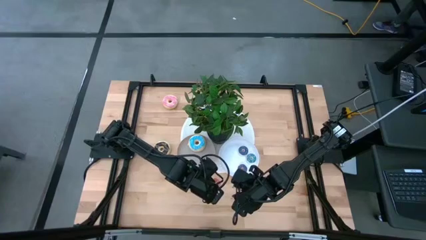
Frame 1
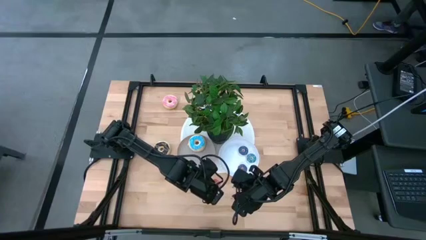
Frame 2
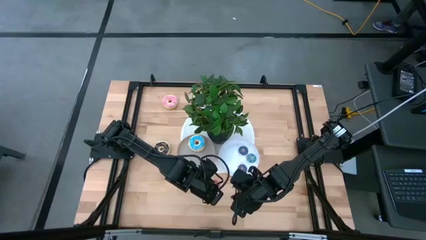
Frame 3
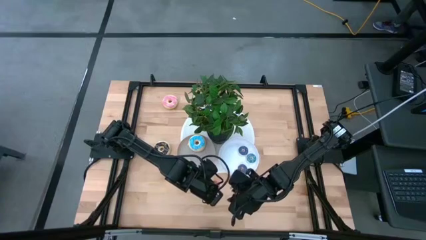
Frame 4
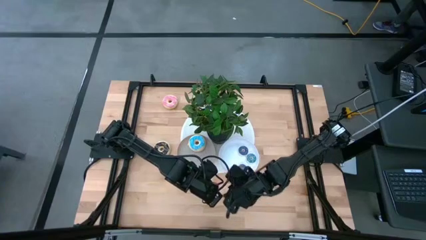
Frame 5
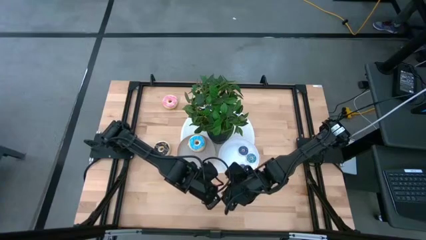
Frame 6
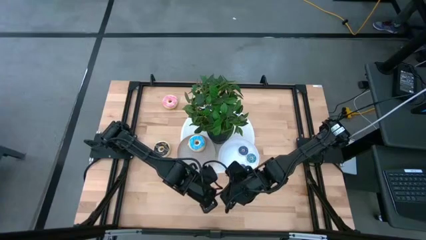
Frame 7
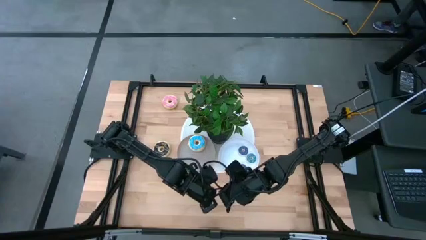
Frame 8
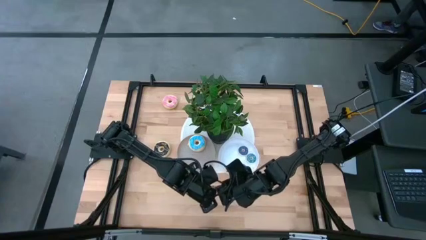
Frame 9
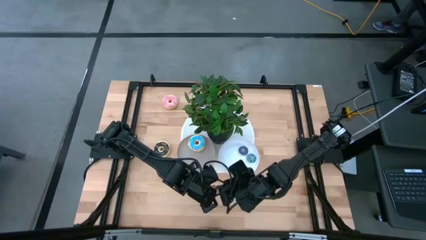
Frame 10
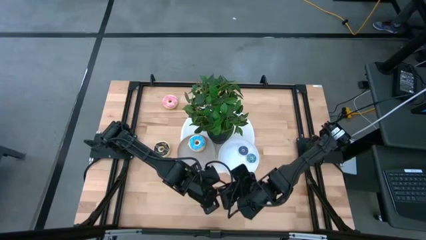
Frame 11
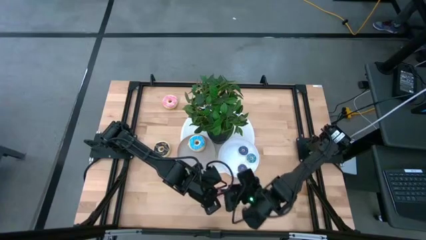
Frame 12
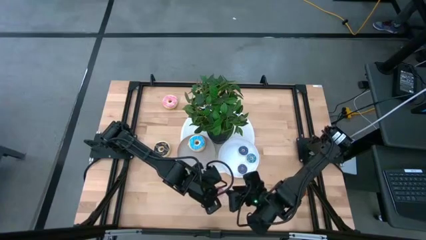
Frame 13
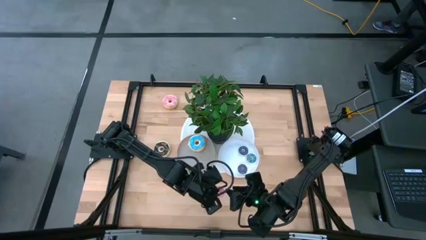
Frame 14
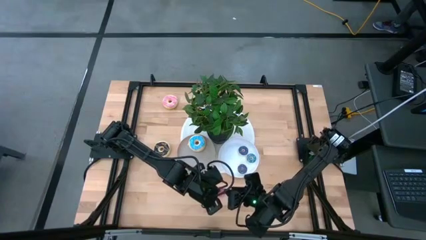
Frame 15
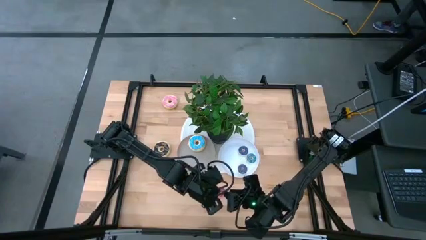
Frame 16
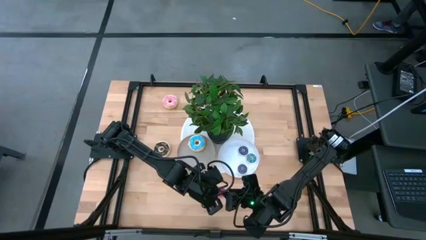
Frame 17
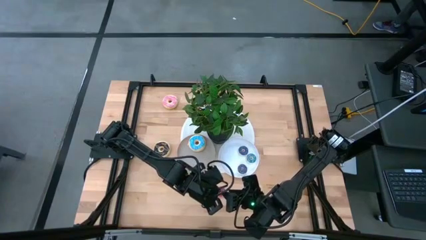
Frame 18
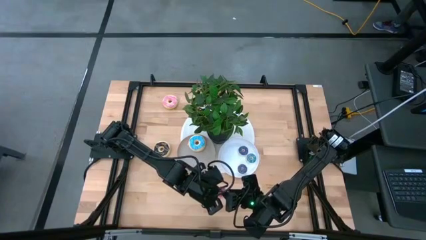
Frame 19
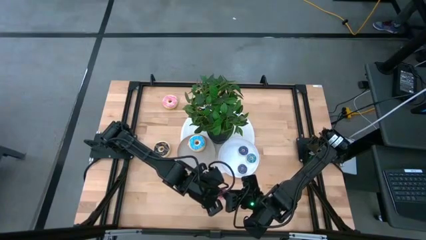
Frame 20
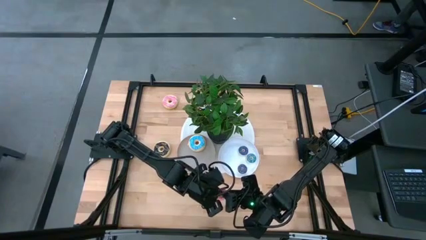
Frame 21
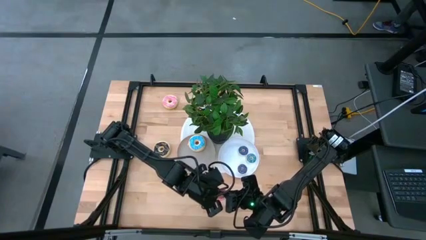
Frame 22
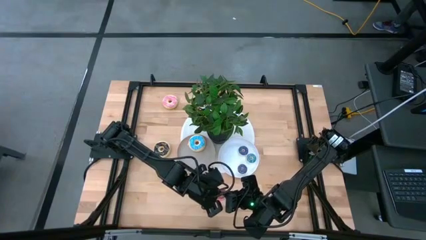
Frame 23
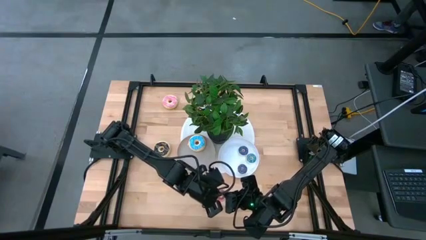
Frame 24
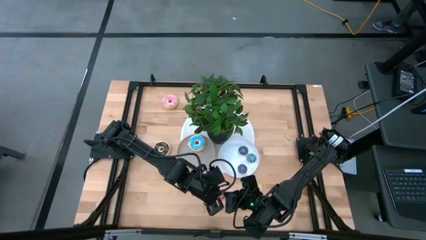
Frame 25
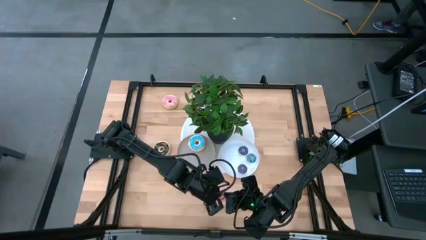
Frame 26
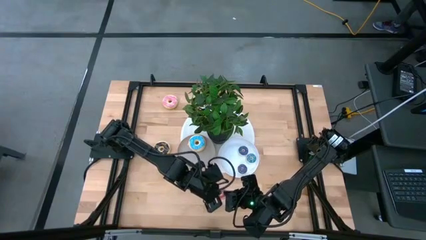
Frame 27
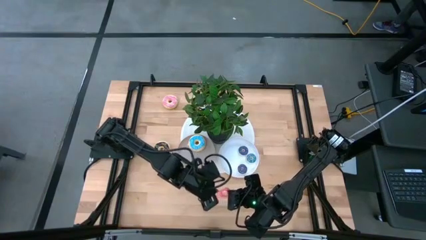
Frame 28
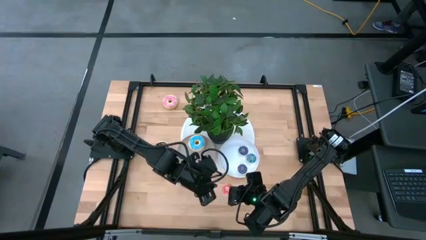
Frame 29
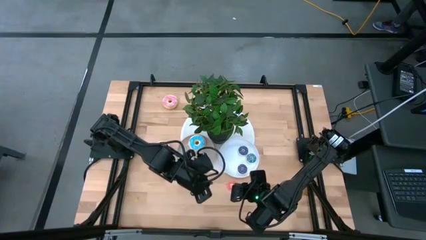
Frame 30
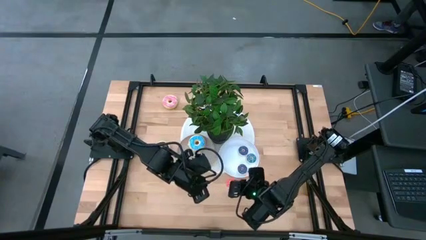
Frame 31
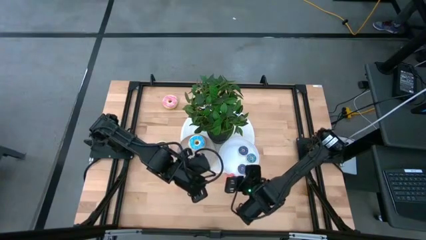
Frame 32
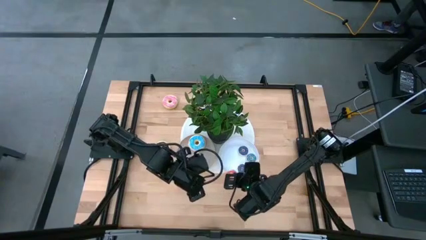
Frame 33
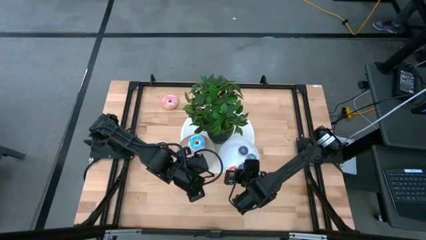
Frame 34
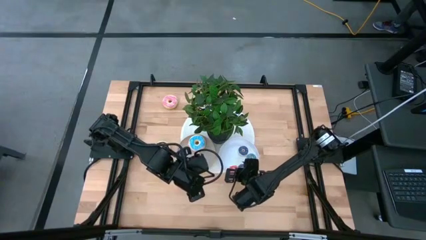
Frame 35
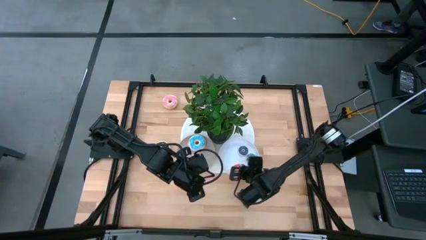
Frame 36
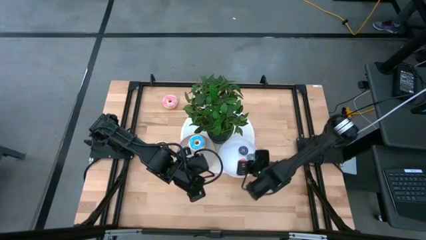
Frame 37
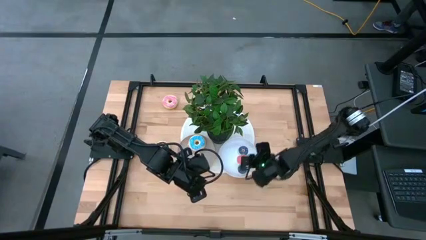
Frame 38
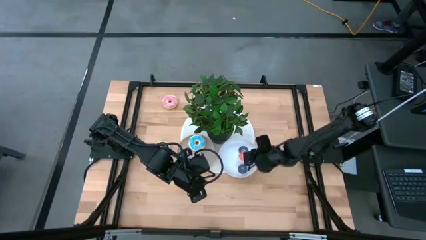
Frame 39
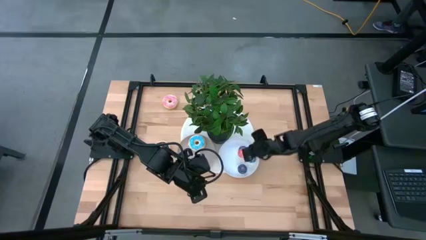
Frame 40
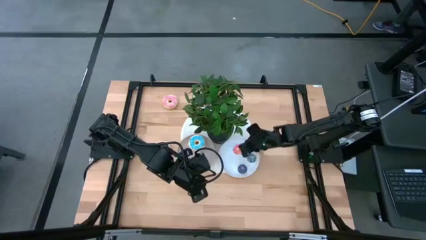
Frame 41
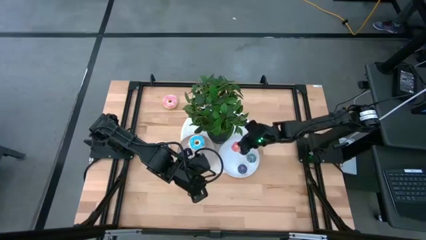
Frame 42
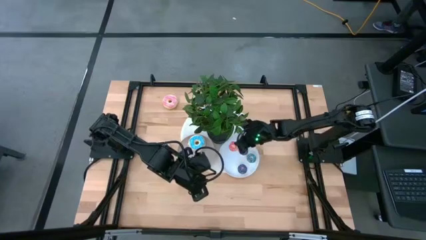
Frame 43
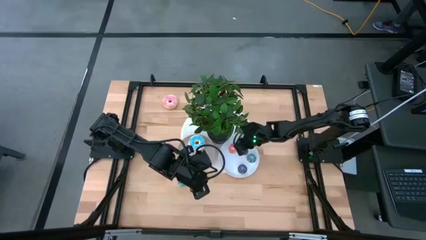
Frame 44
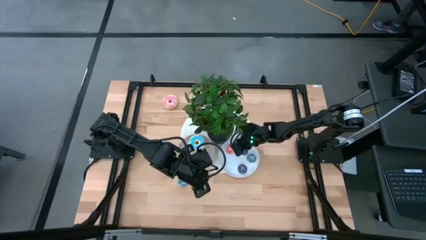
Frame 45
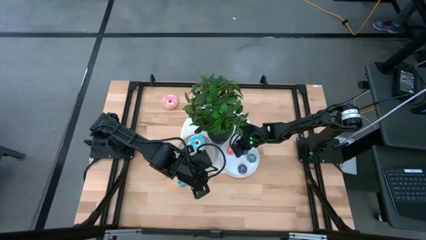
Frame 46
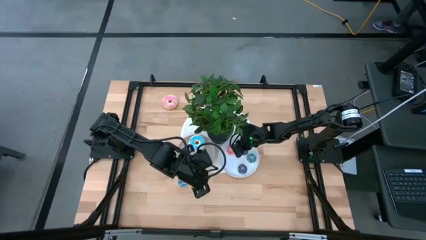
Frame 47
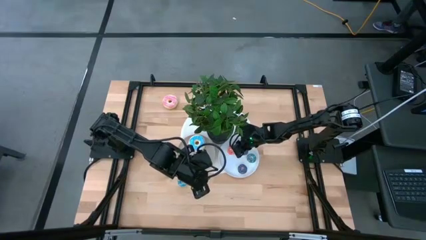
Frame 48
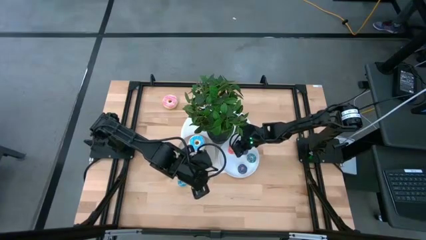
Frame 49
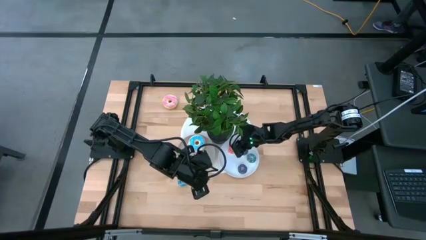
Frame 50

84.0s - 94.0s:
Task: Pick & Place donuts
Put the small pink donut on the white plate

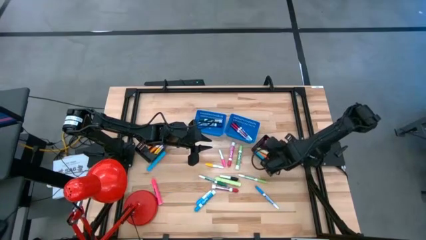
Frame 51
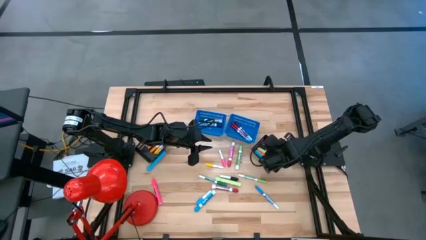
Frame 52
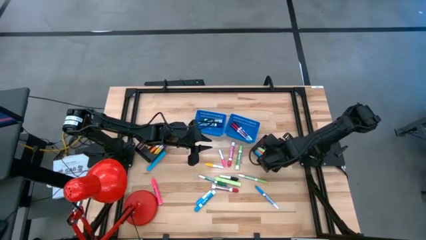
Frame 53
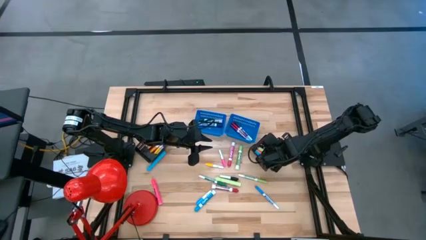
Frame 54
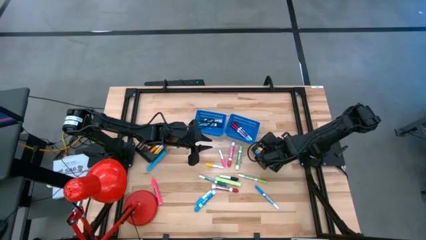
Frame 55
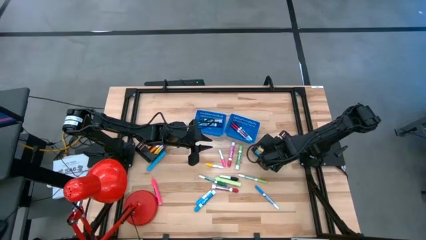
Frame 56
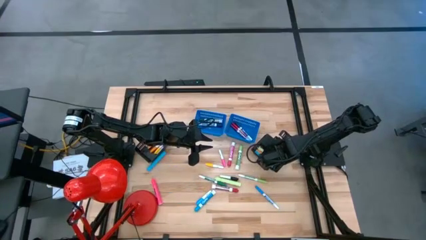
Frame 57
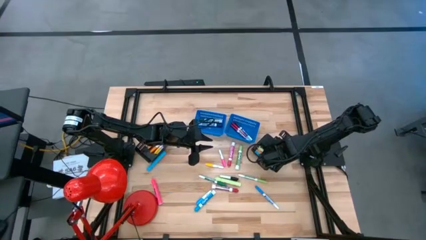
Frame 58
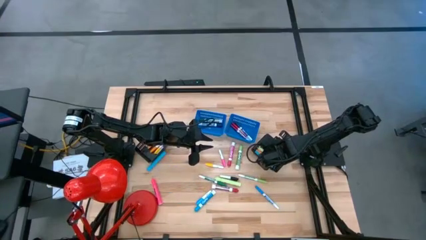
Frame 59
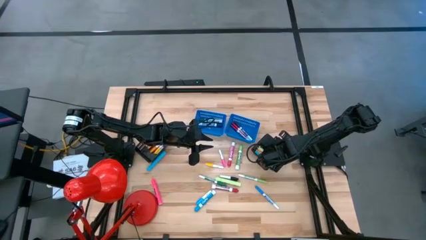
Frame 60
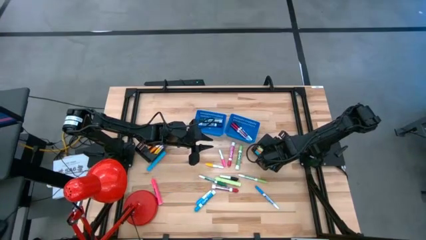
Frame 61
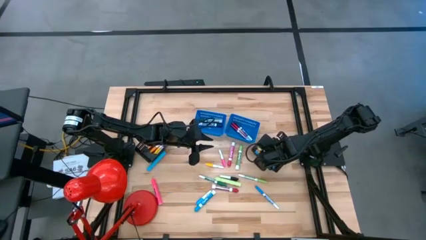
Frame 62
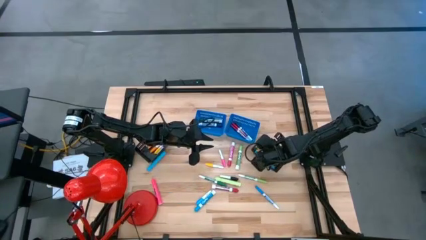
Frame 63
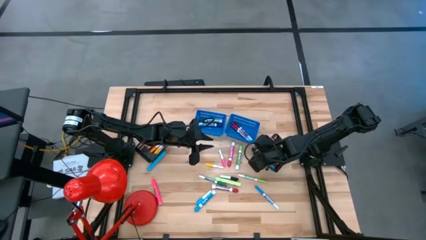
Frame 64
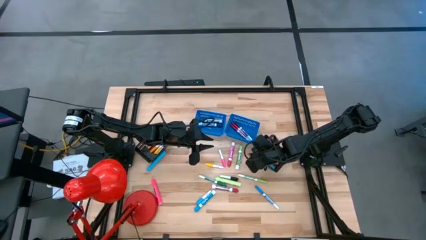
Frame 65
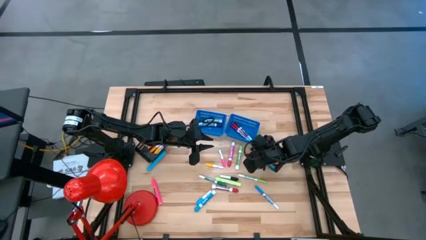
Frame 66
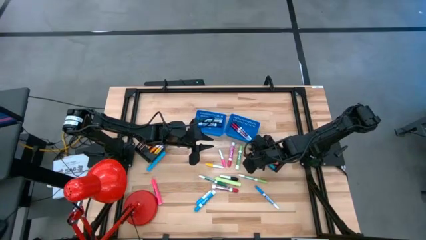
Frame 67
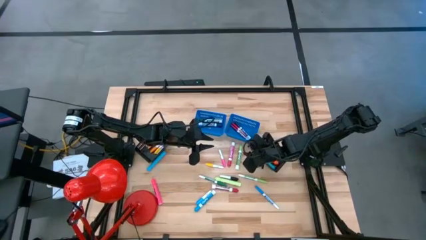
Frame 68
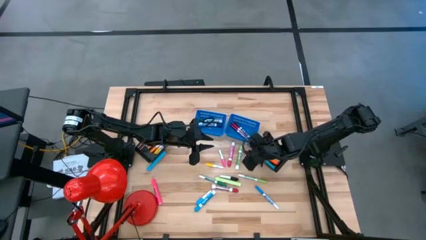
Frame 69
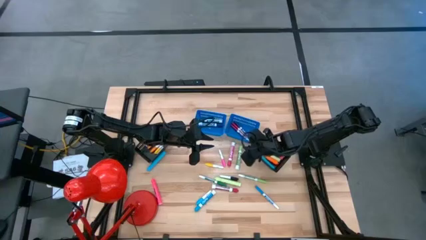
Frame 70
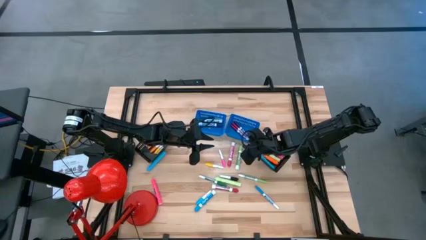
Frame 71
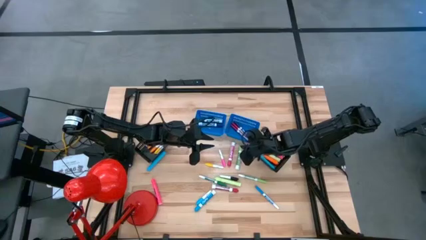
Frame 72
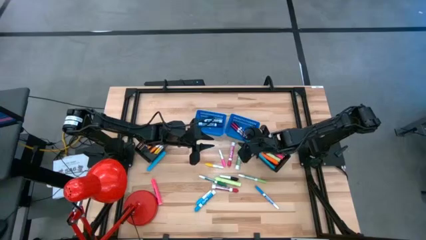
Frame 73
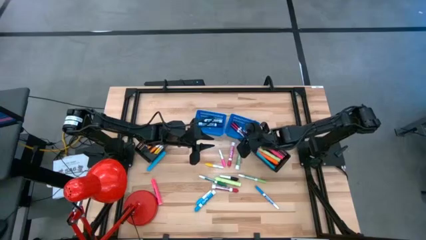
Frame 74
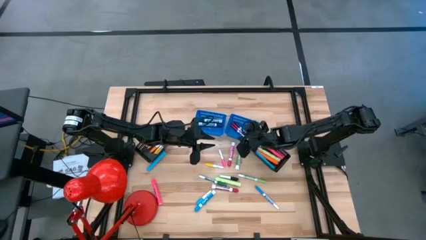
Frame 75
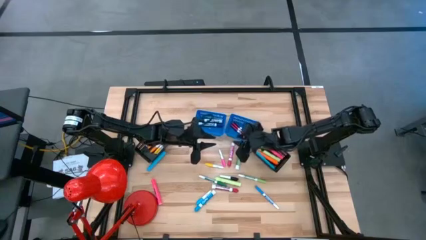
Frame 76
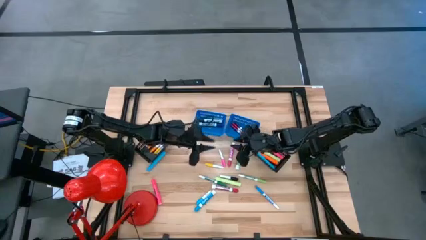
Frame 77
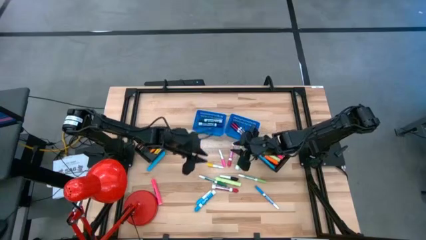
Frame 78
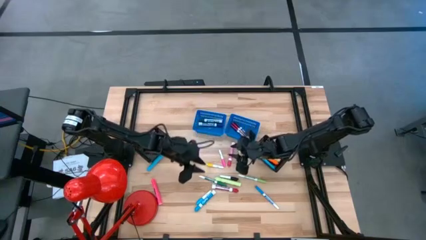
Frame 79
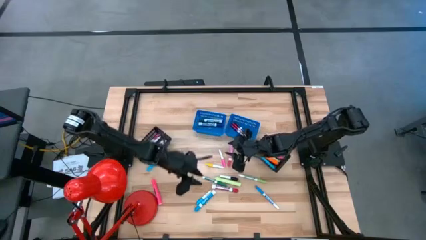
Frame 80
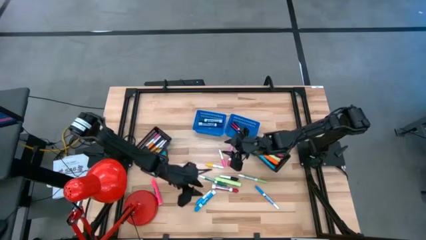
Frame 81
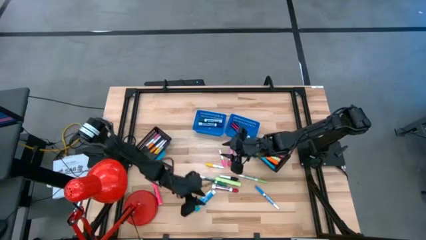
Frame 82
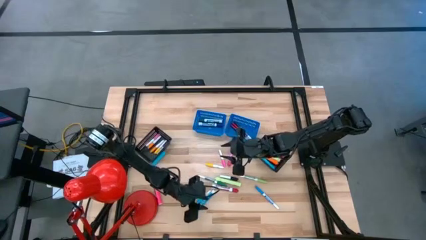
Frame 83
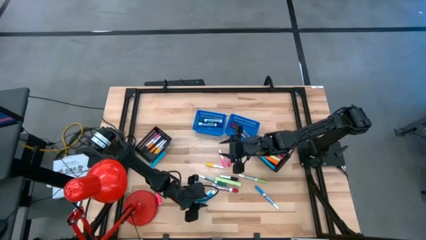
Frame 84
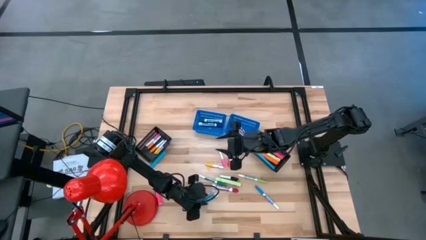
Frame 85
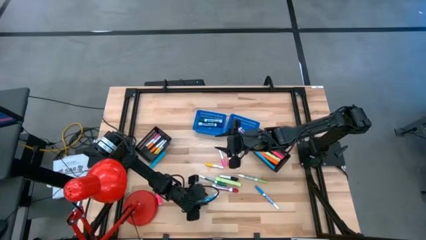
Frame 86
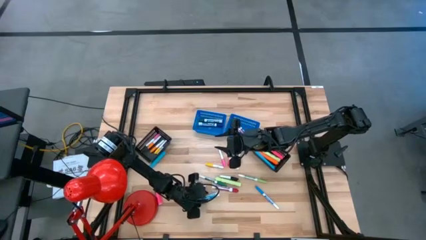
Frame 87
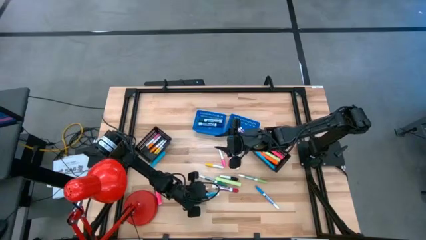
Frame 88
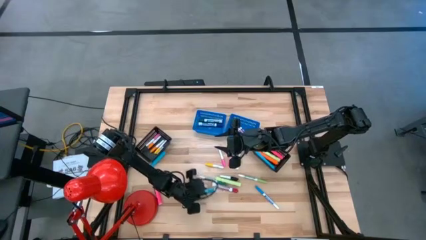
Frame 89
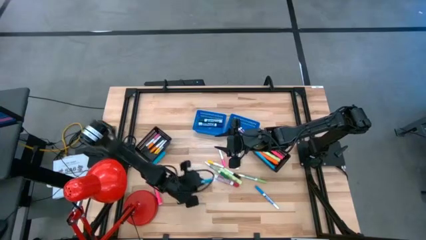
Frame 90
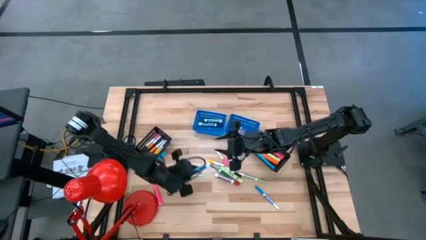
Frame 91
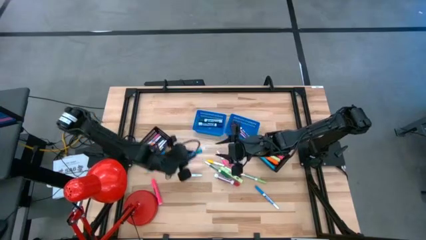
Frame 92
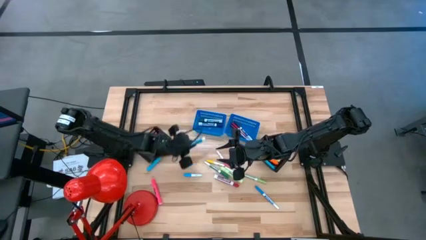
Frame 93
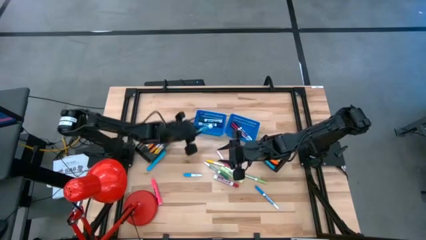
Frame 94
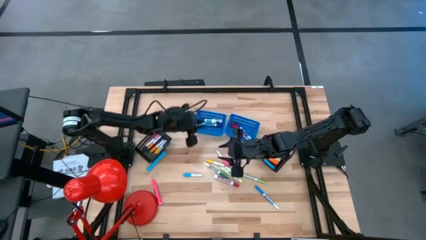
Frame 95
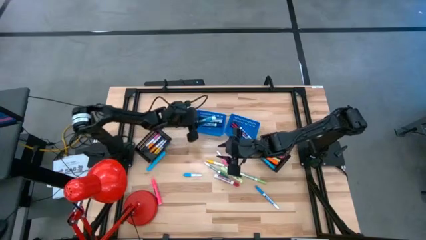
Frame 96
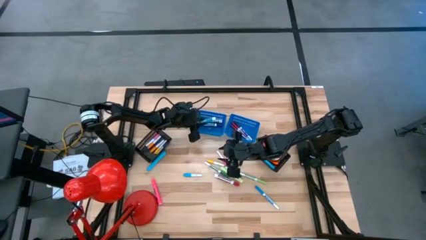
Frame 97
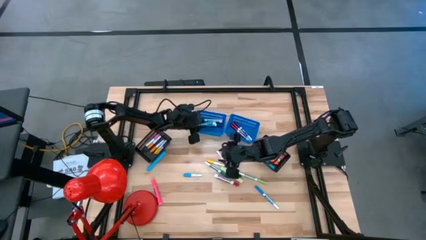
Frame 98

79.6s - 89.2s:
Task: Pick & Place Markers
Put the light blue solvent marker into the left blue bin
